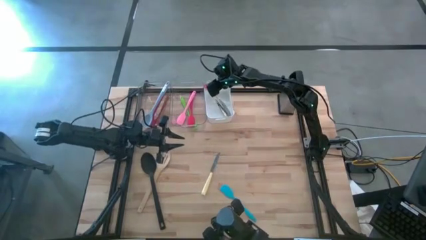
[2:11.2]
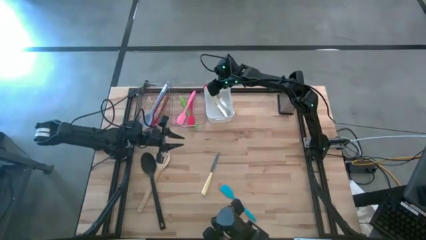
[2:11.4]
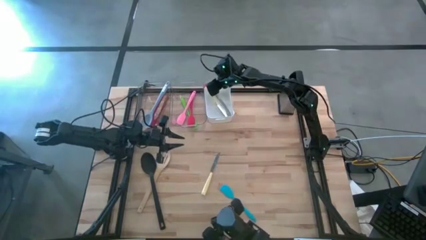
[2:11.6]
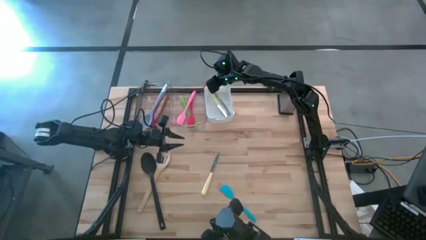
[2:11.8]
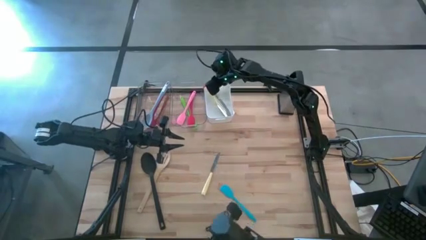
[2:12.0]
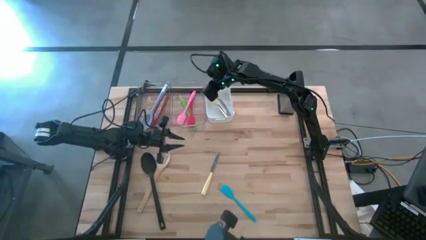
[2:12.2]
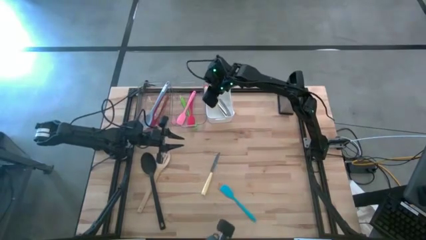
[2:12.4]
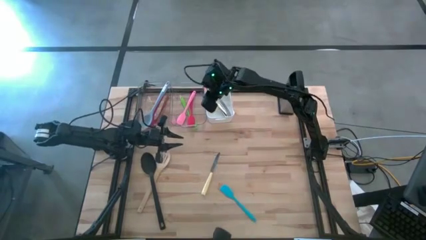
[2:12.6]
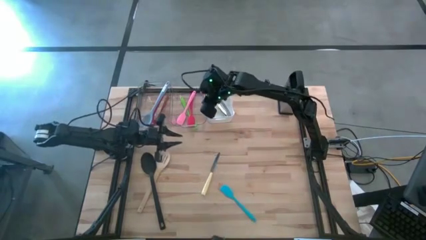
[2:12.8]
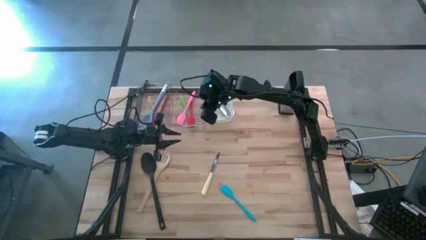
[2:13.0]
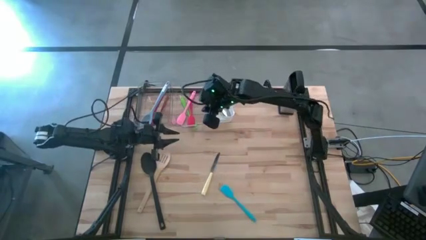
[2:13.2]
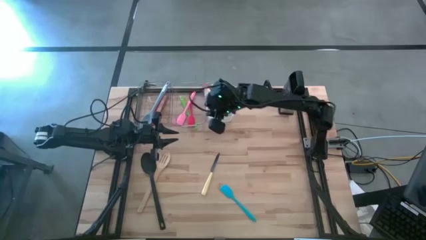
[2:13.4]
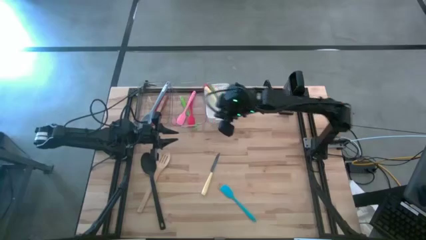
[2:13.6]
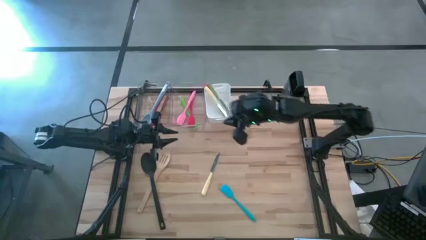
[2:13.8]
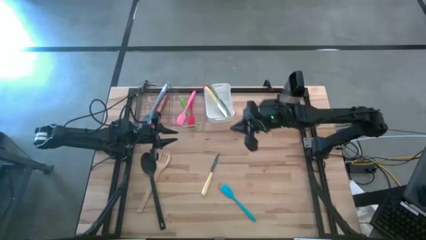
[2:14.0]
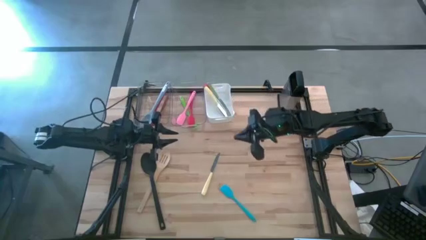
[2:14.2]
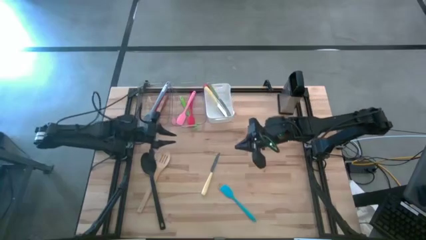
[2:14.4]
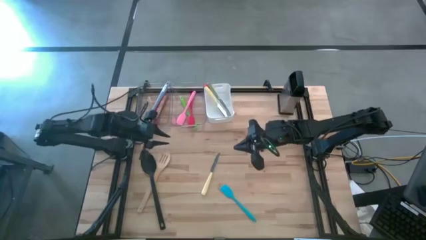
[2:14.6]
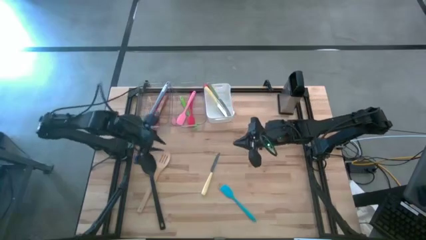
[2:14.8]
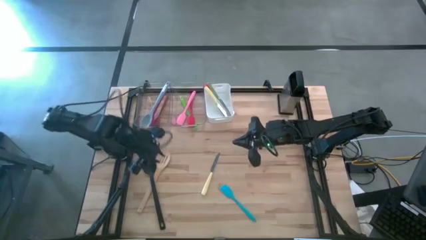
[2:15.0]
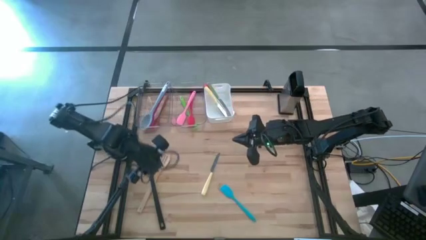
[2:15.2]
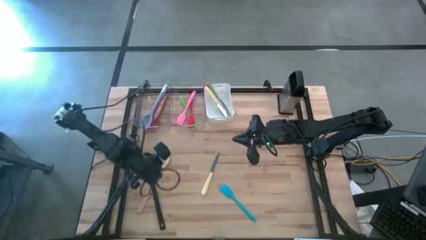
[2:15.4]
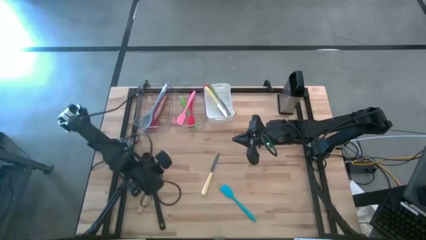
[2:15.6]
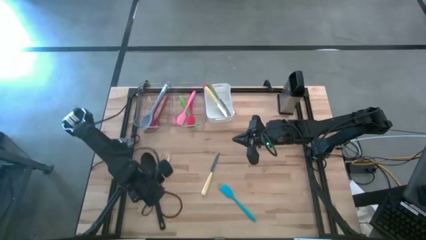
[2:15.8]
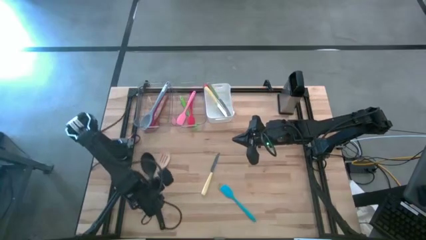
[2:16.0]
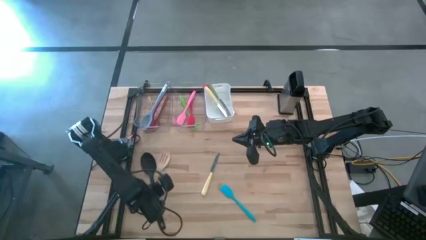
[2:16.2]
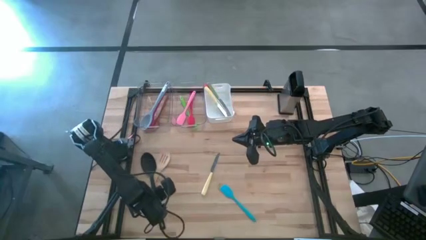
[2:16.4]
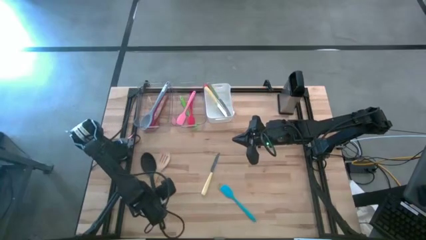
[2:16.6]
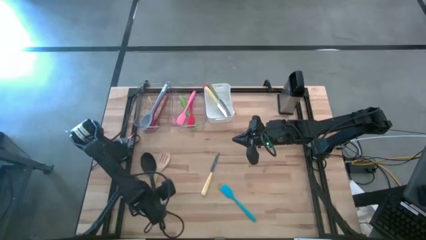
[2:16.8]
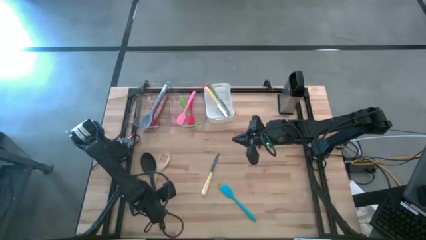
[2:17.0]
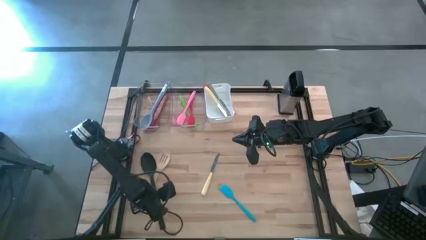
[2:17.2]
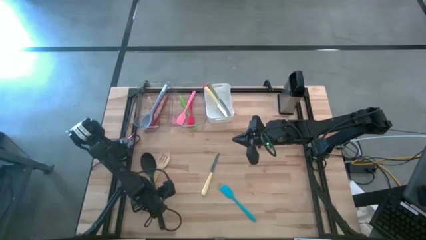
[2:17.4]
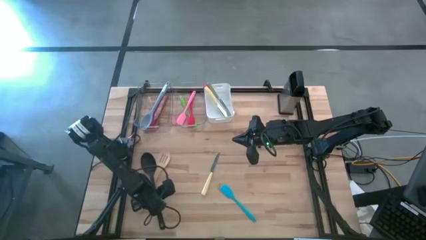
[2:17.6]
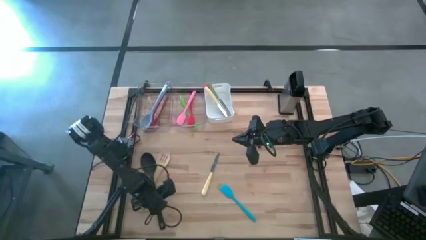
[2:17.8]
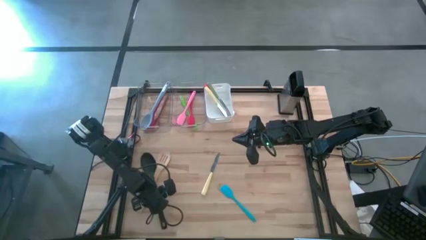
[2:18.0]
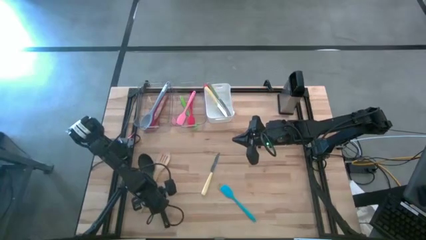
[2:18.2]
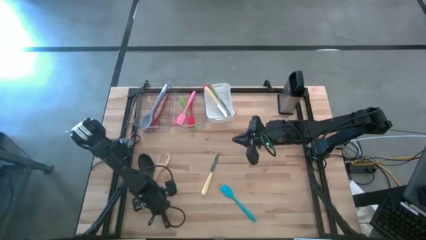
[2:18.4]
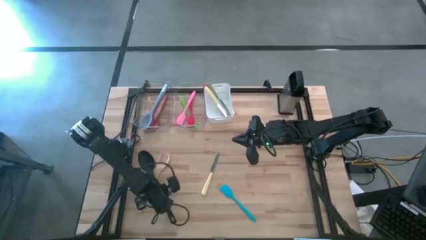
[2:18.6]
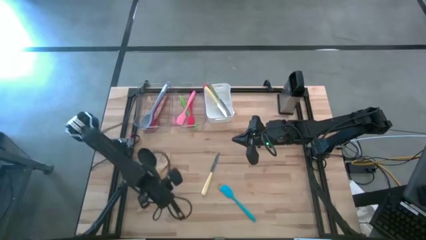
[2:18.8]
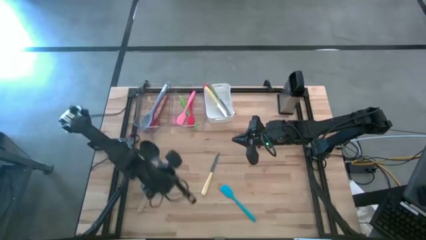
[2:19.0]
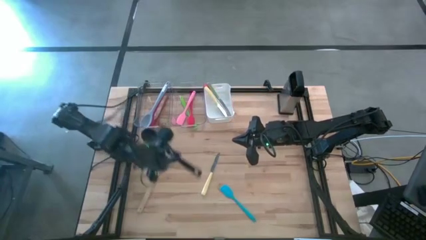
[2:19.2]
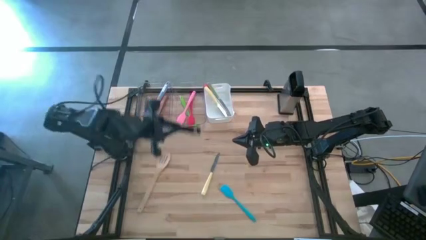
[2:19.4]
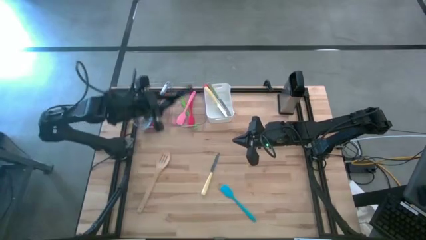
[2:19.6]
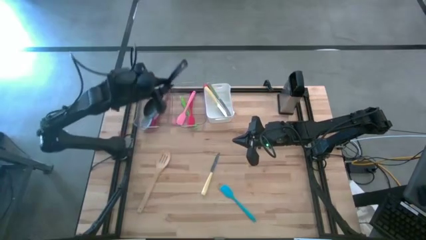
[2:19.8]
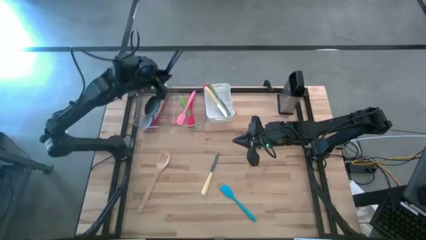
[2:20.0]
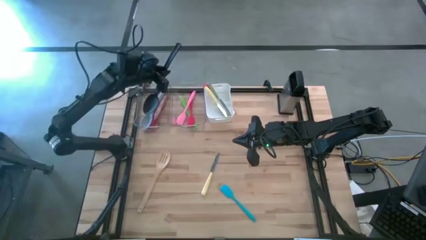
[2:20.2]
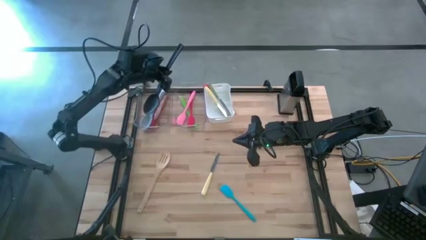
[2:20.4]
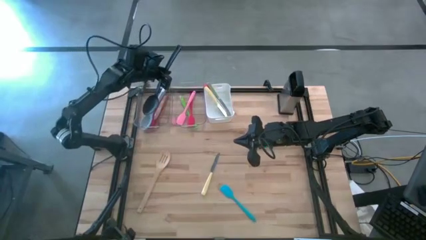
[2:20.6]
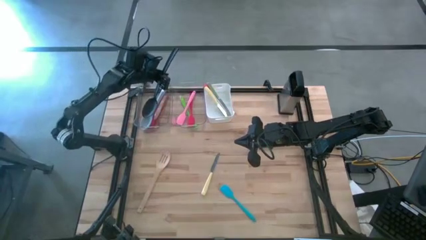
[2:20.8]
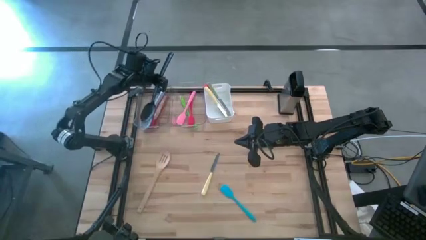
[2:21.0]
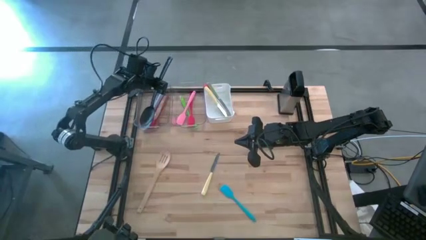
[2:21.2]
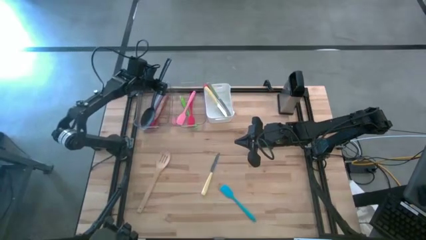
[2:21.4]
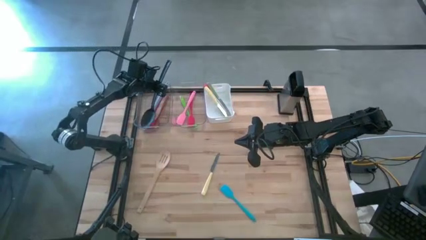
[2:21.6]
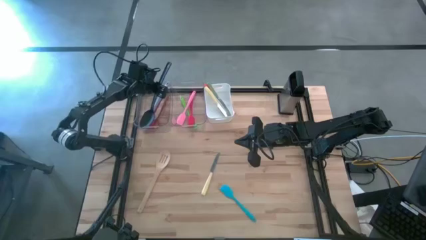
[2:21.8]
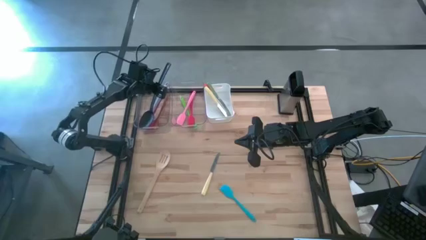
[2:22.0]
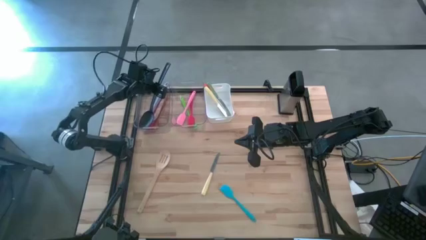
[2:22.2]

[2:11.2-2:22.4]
Task: Pick & Place Kitchen Items
Put the black serving spoon into the left transparent bin

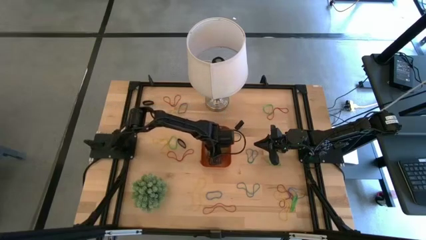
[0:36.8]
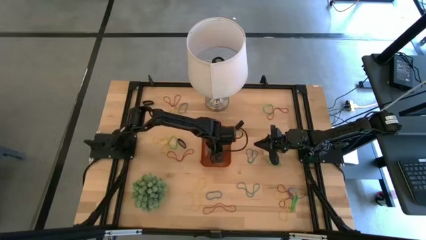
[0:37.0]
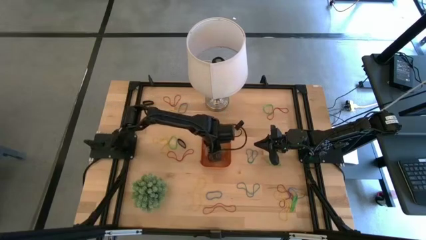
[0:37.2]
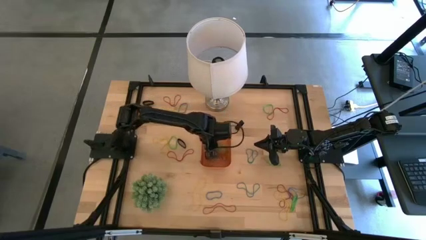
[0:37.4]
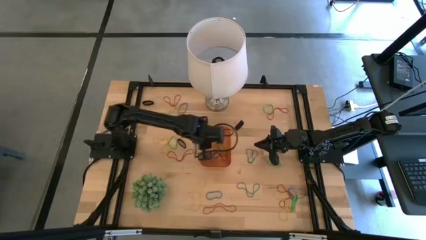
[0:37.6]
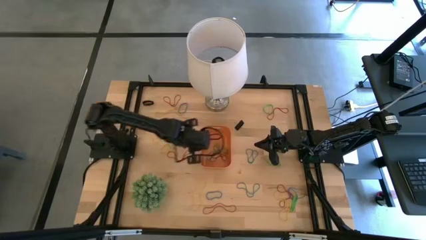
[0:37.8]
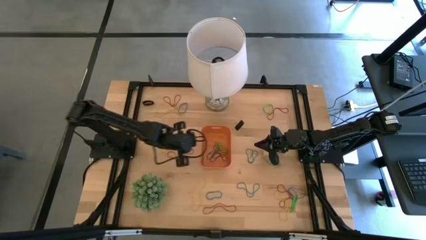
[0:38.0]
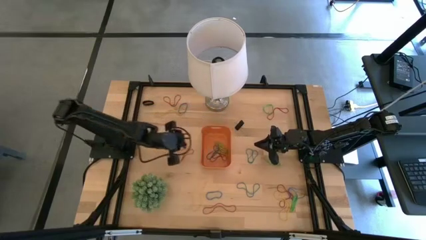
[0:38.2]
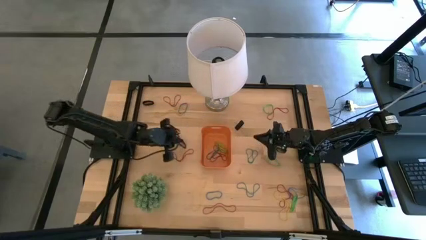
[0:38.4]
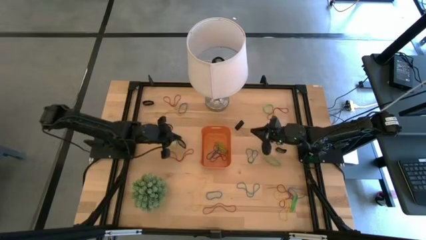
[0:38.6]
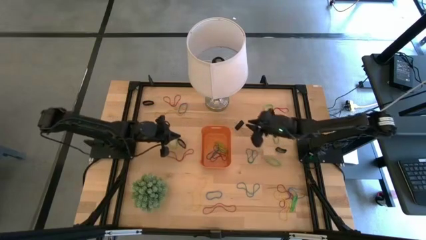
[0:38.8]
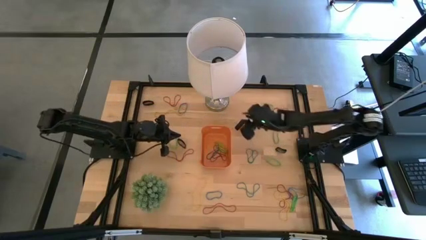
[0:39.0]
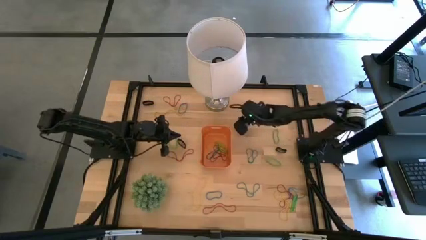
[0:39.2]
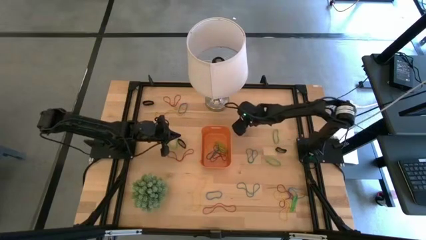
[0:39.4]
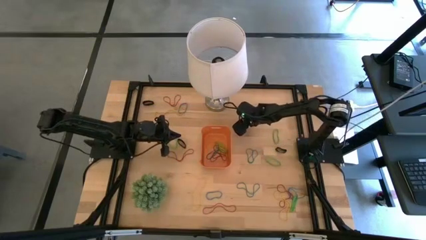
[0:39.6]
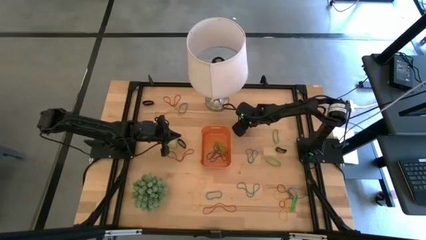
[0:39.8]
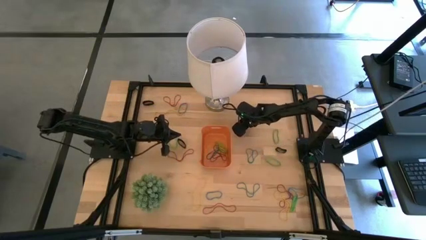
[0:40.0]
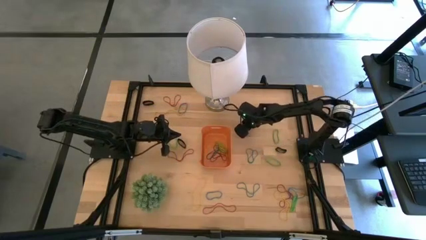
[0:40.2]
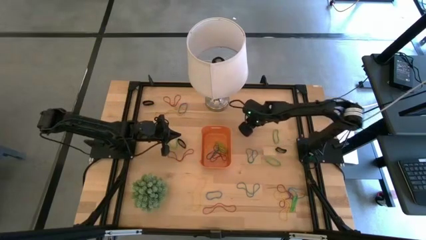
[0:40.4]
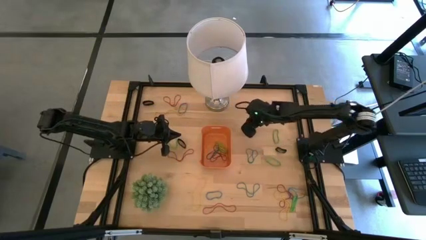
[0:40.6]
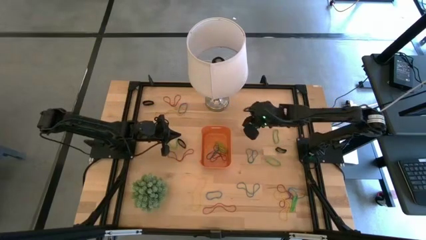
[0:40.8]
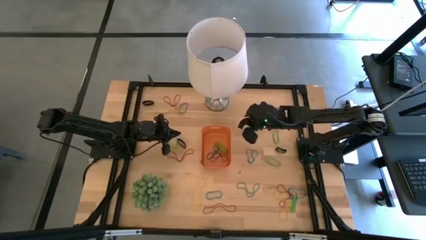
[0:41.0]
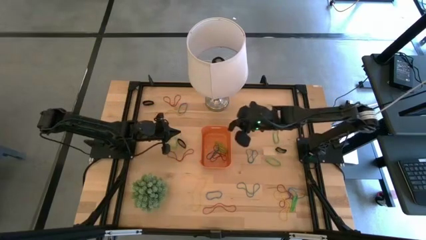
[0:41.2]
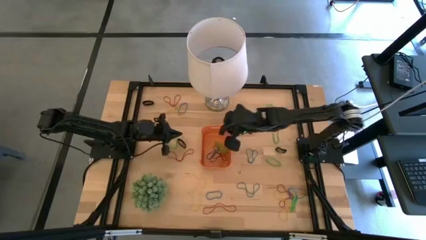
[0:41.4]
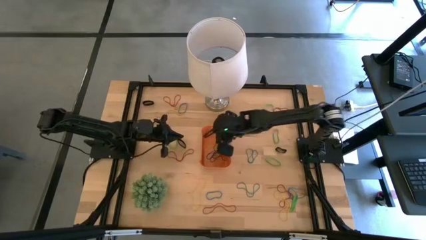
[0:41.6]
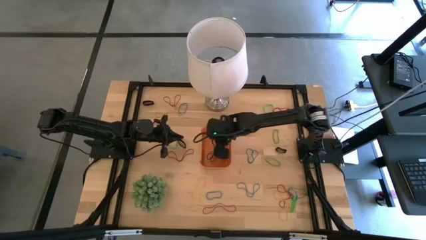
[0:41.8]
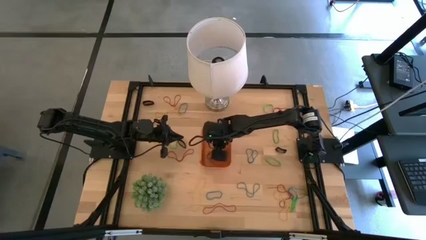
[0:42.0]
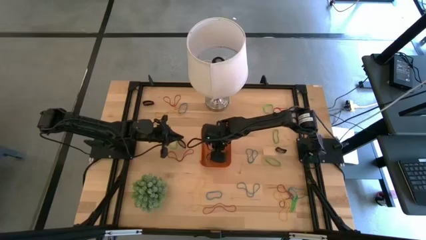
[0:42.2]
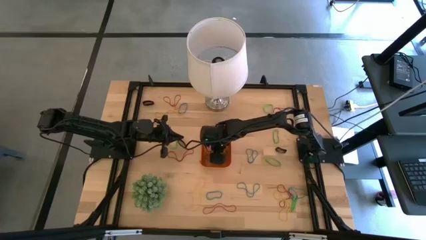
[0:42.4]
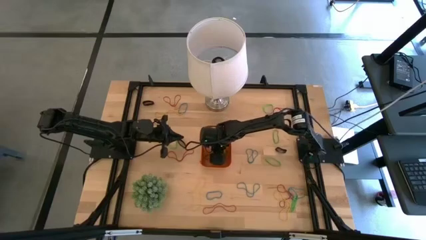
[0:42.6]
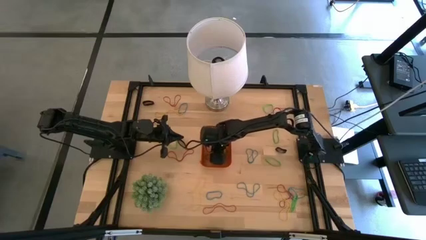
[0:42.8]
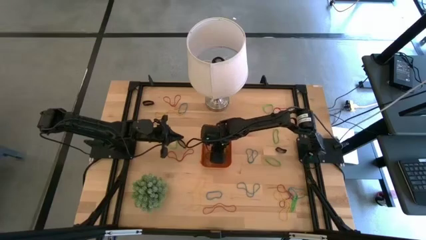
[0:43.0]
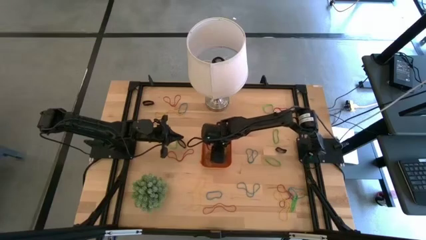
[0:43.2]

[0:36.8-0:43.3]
Task: Pick and place rubber bands into bin
Put the black rubber band into the orange bin
